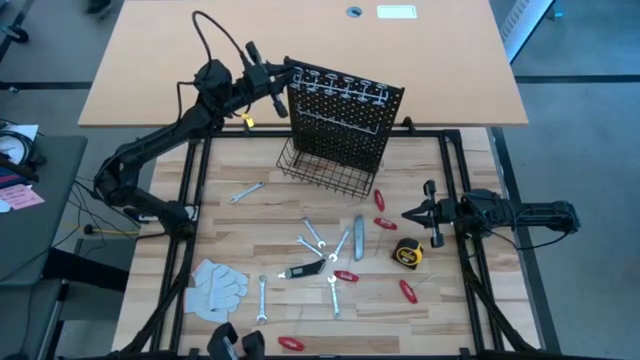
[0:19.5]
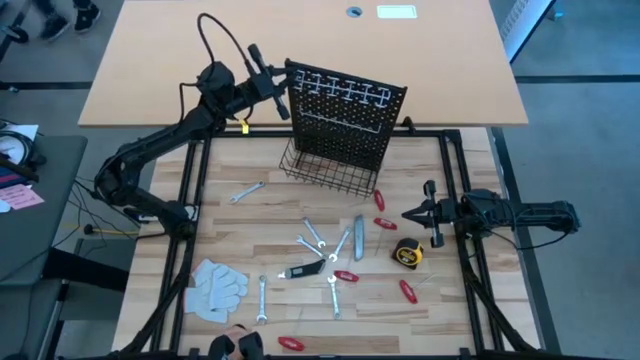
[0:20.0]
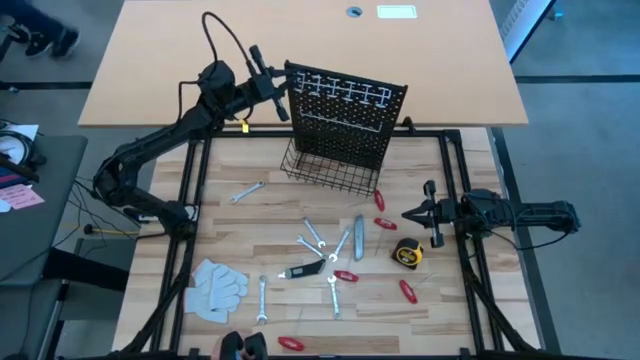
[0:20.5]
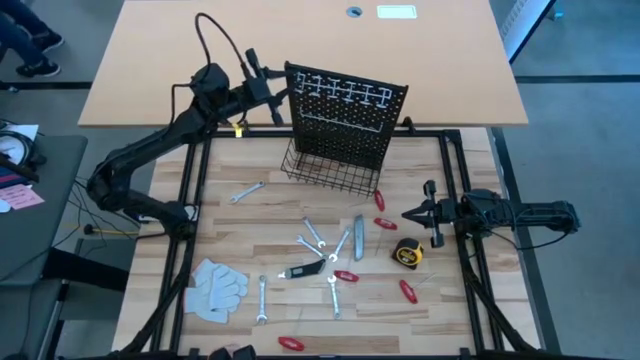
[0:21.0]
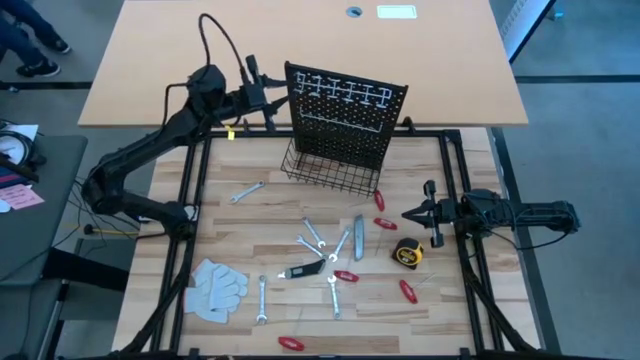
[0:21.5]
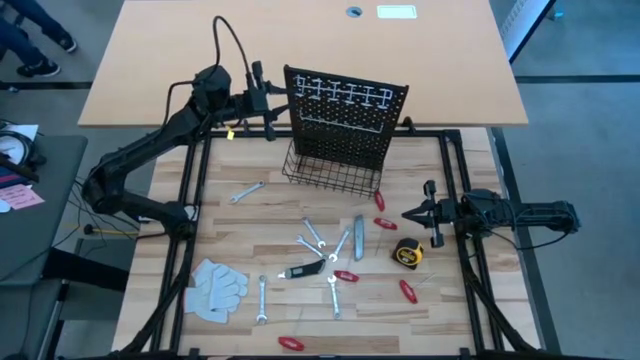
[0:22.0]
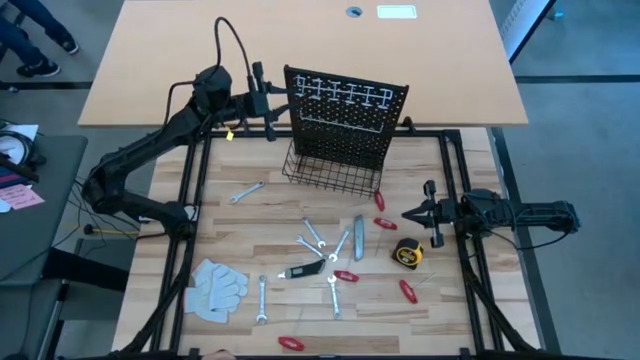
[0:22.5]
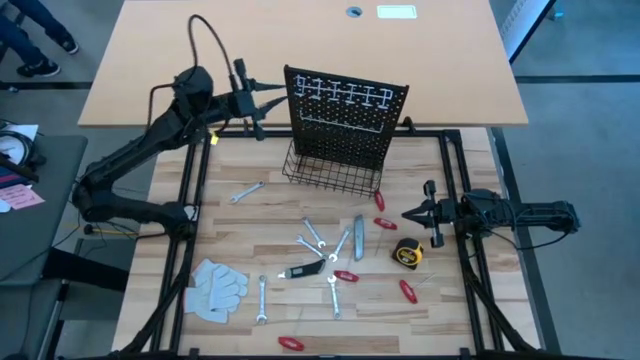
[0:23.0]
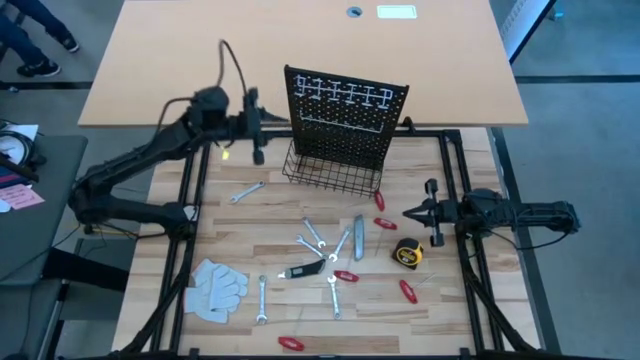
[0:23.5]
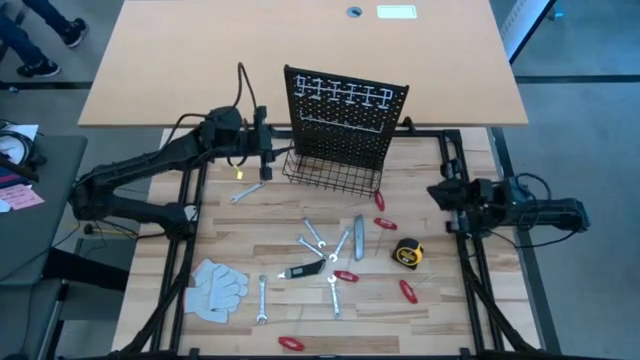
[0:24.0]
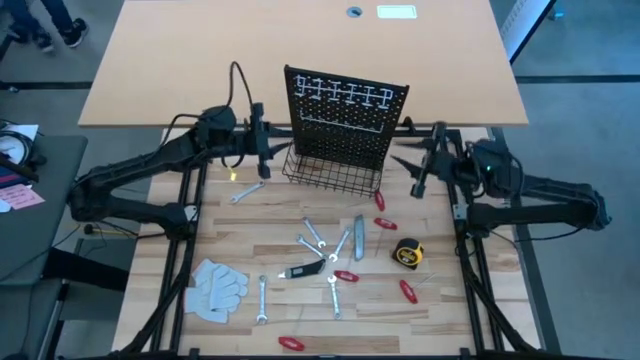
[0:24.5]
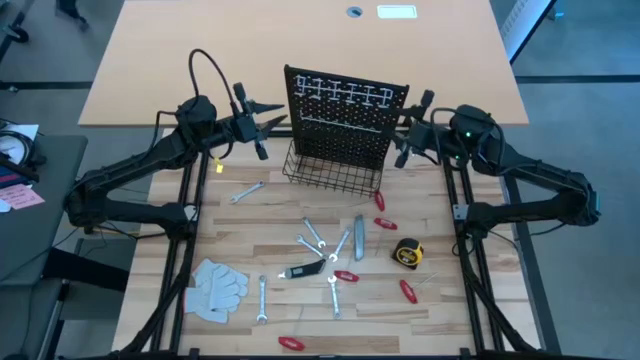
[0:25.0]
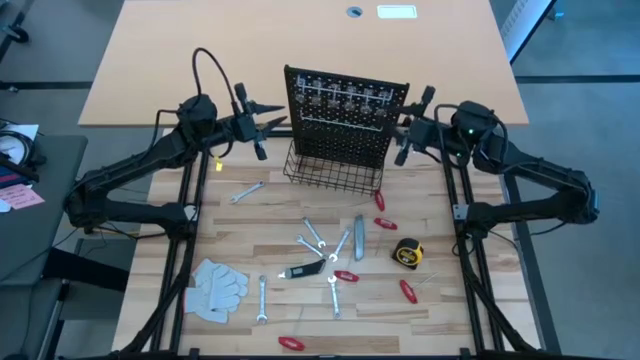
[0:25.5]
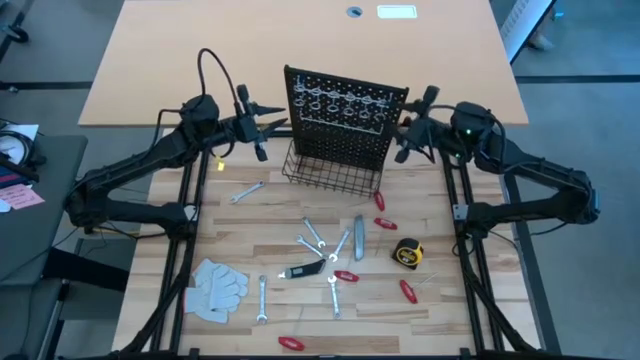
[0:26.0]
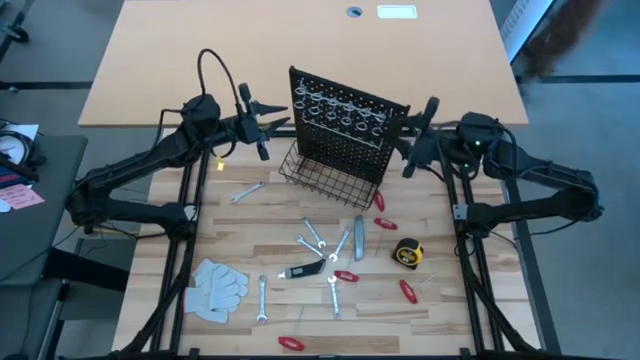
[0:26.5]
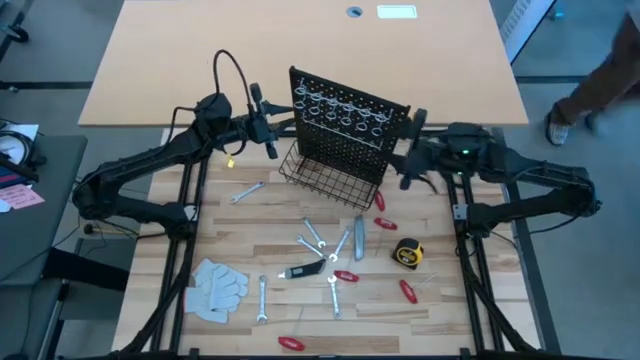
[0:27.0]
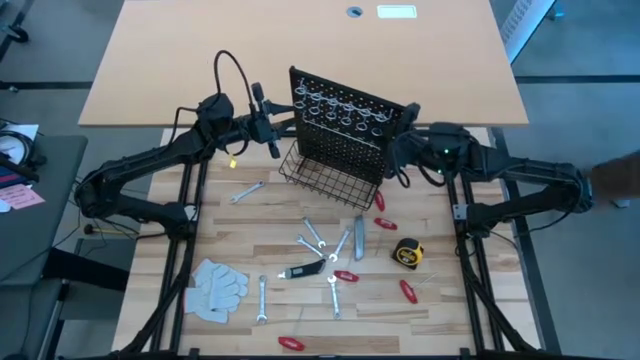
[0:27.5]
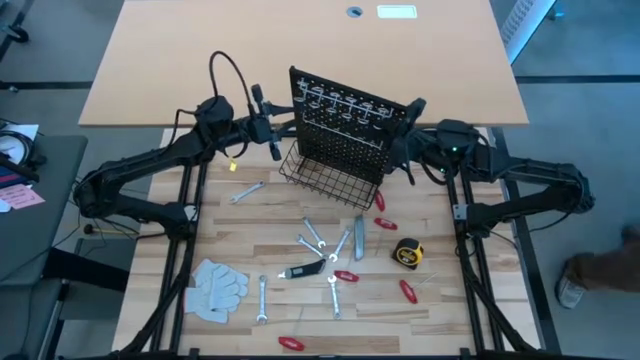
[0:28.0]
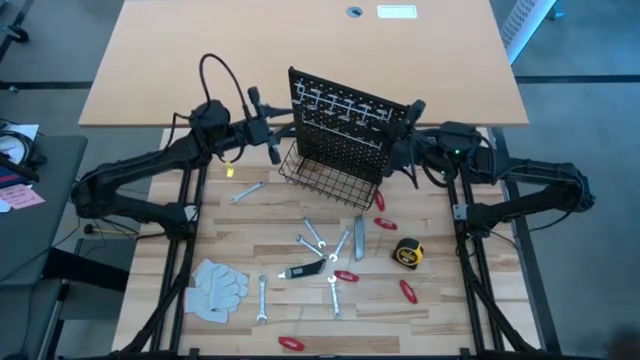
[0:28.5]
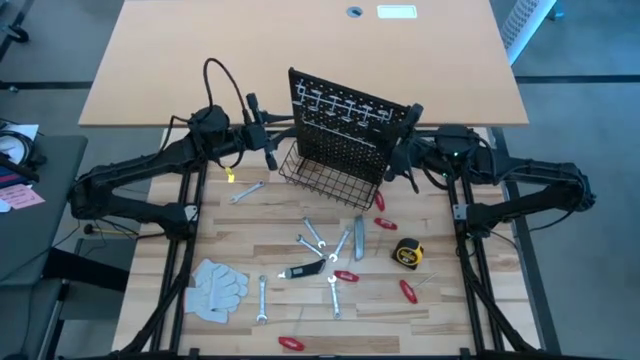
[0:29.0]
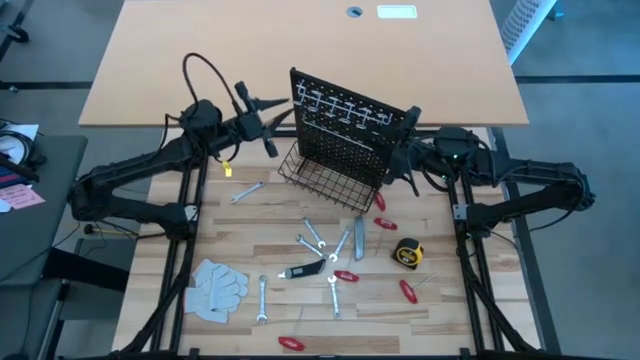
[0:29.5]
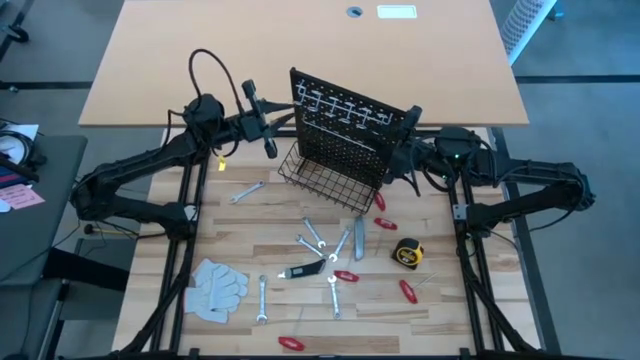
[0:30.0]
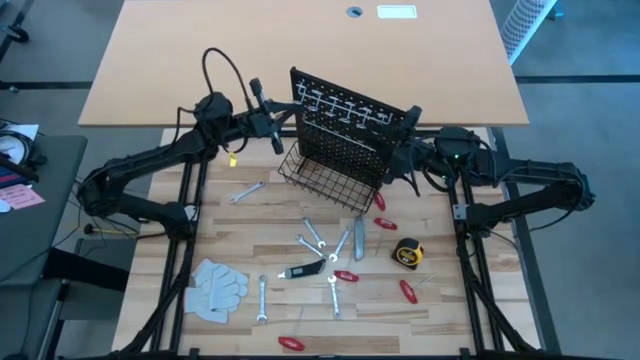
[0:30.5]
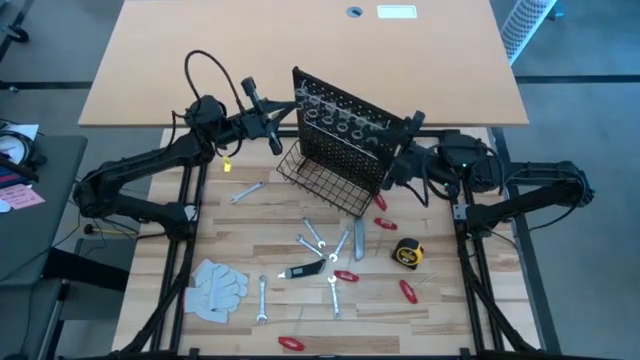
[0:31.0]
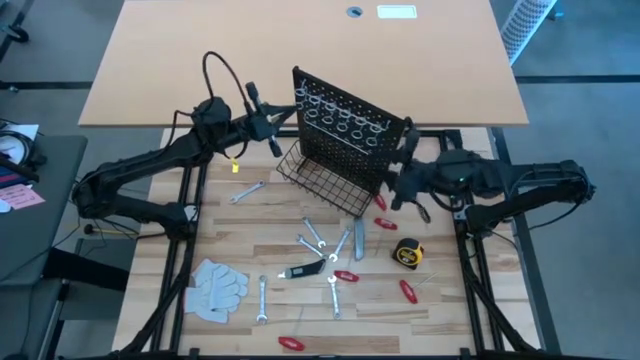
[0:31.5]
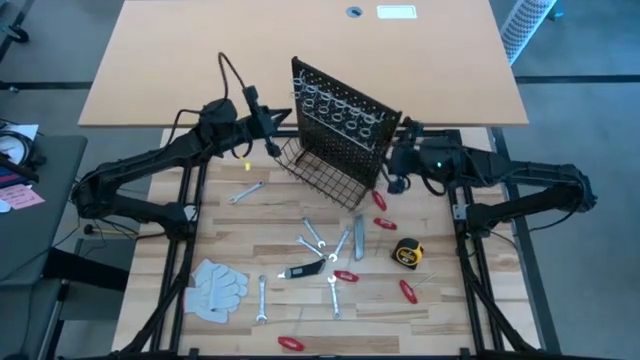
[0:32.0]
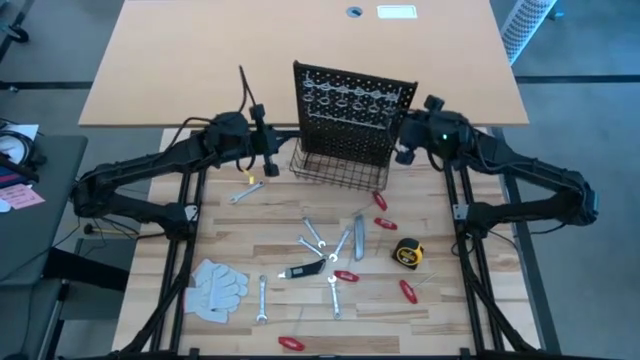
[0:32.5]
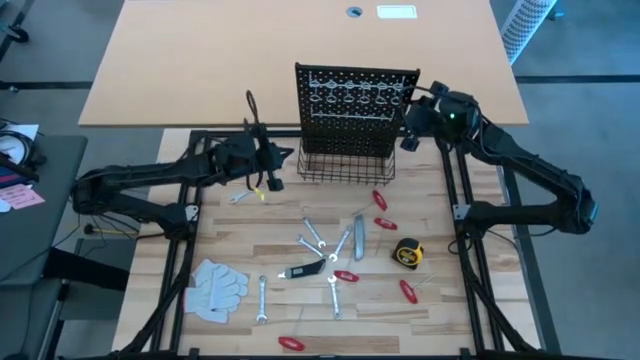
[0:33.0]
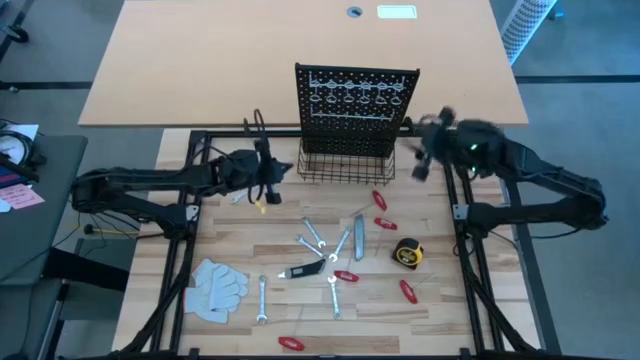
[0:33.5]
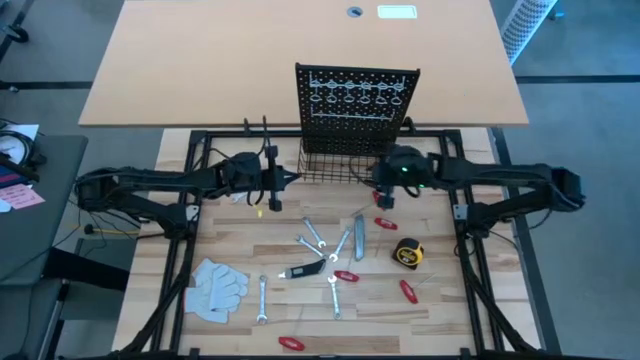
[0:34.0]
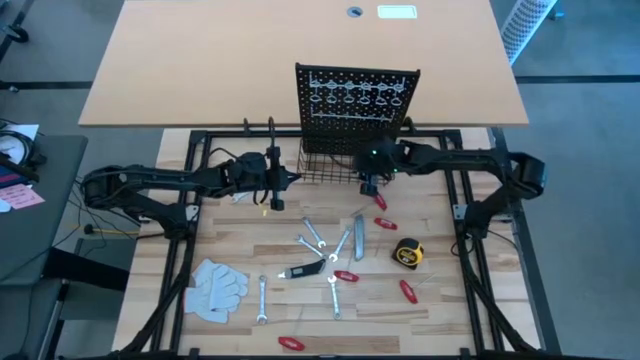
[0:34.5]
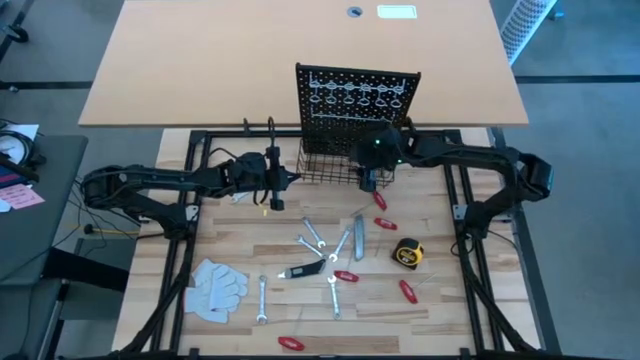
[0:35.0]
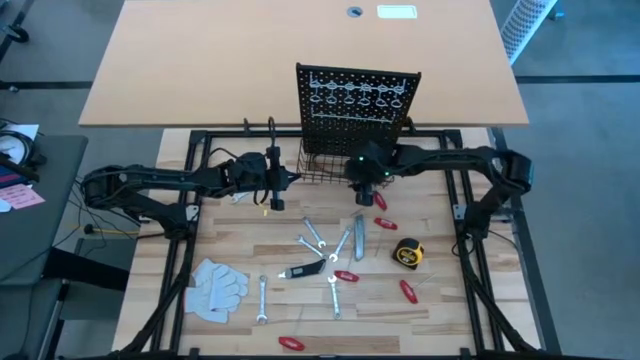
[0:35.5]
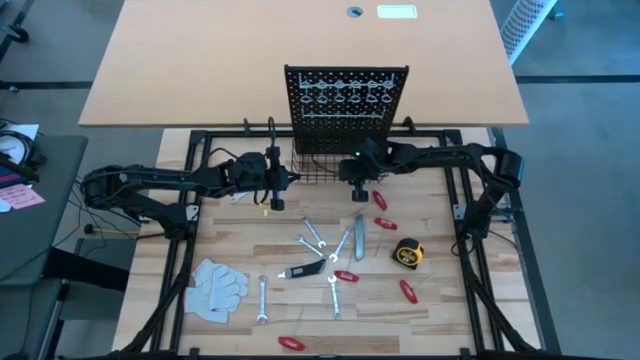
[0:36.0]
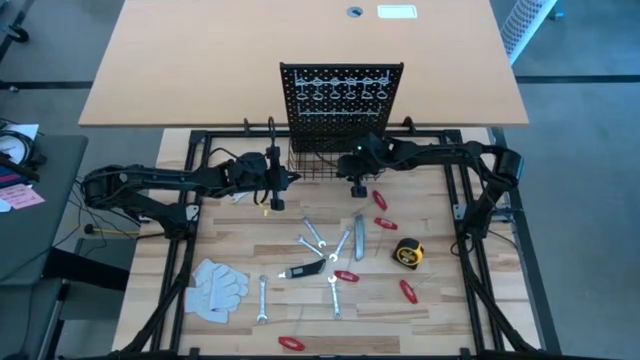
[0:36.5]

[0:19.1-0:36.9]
Task: Hang tools onto peg board
Hang the hook on the pegboard

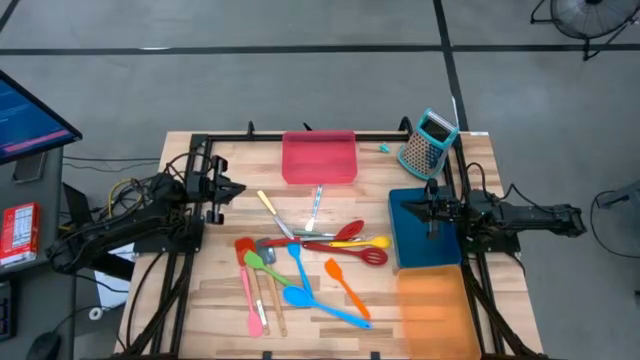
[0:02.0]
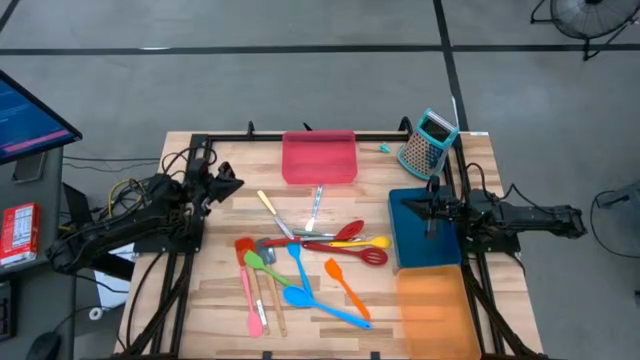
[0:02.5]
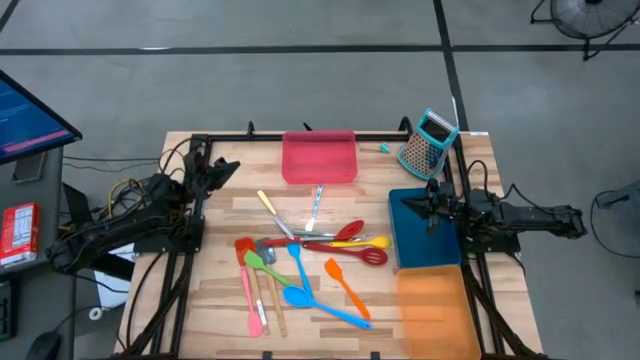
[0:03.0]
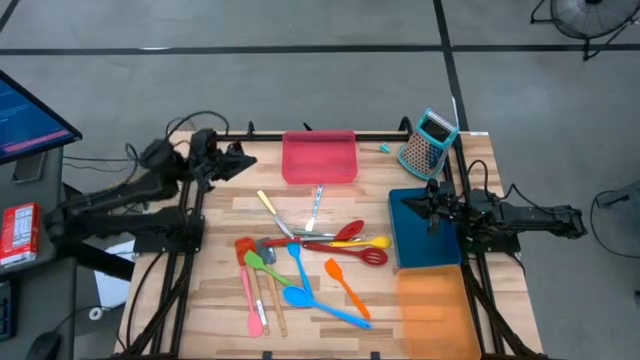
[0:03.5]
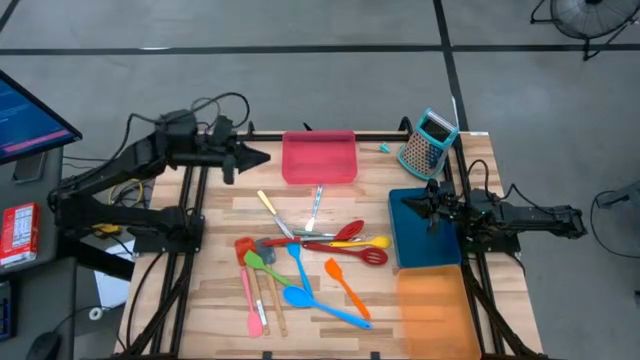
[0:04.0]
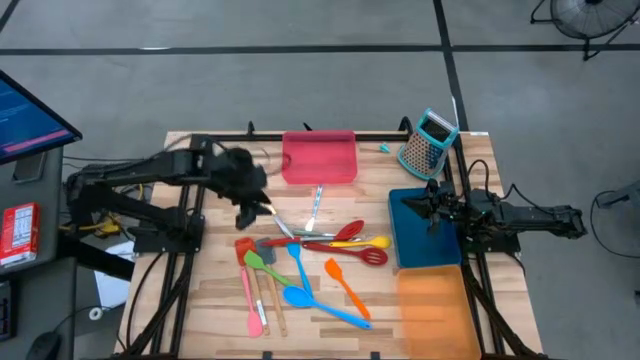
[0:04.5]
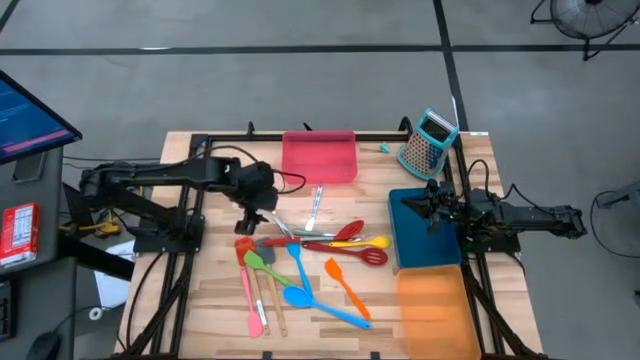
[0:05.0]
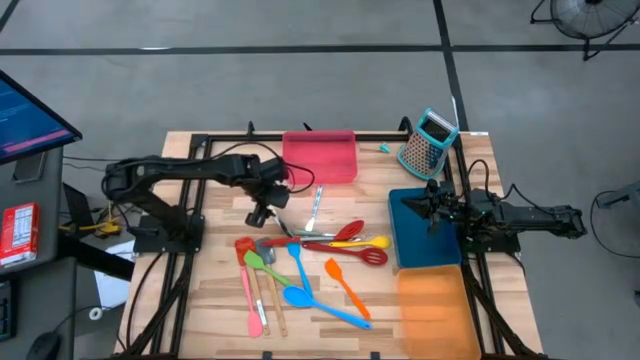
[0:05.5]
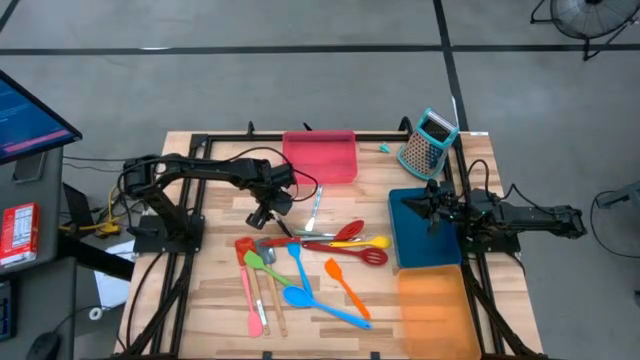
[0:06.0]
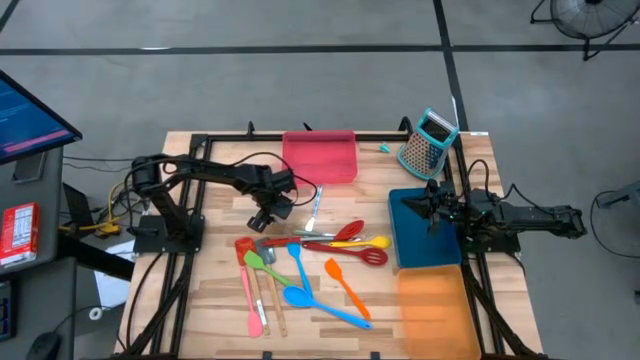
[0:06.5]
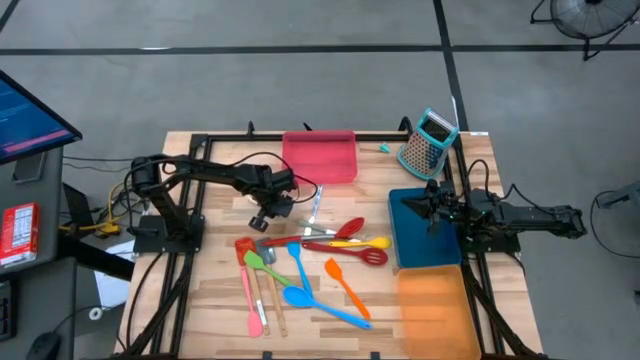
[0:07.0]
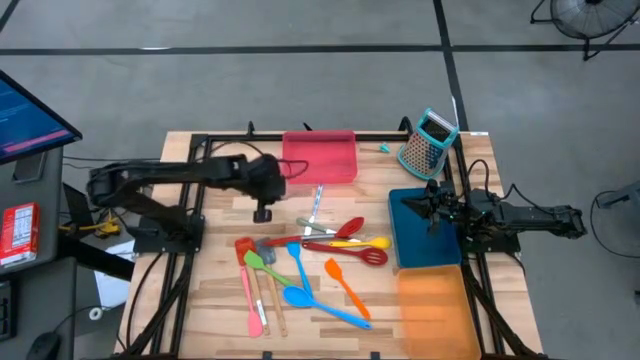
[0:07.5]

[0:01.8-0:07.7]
Task: Pick & Place Kitchen Items
Put the yellow kitchen knife into the orange bin
